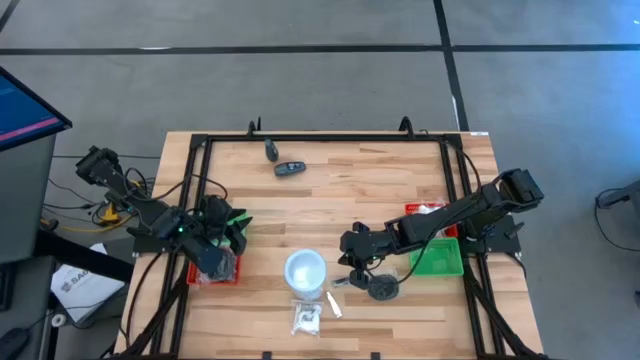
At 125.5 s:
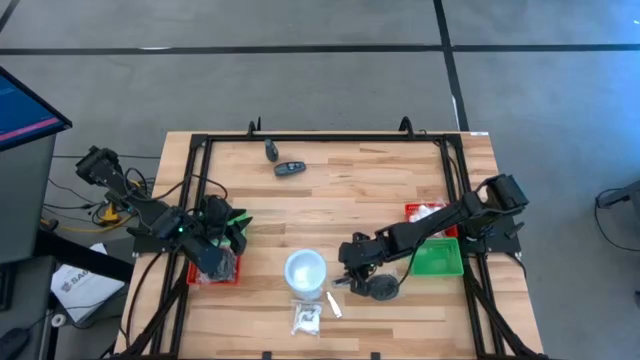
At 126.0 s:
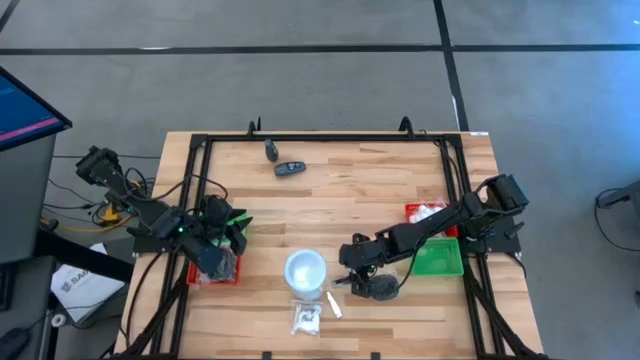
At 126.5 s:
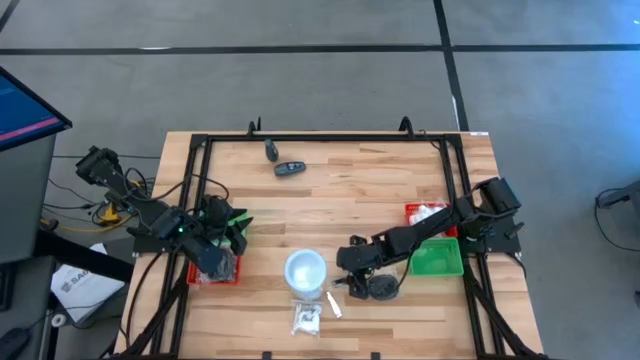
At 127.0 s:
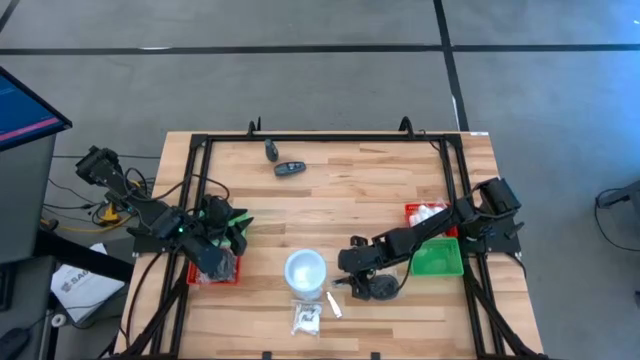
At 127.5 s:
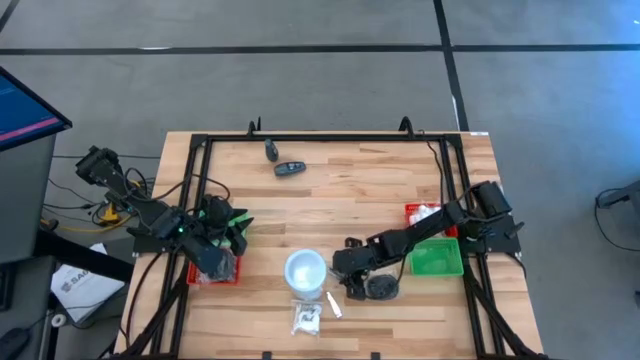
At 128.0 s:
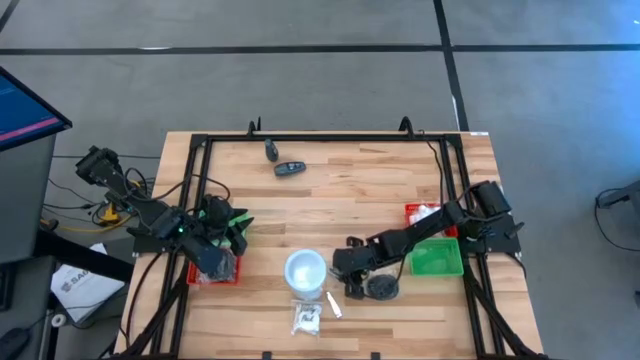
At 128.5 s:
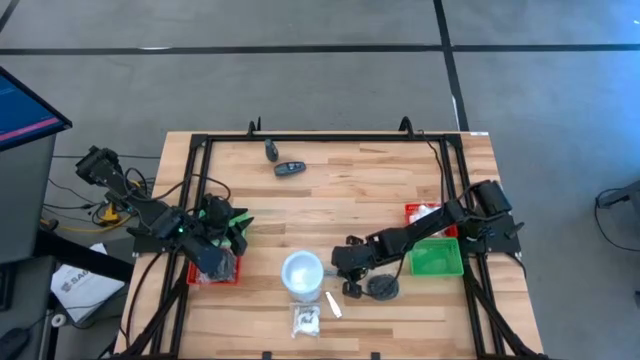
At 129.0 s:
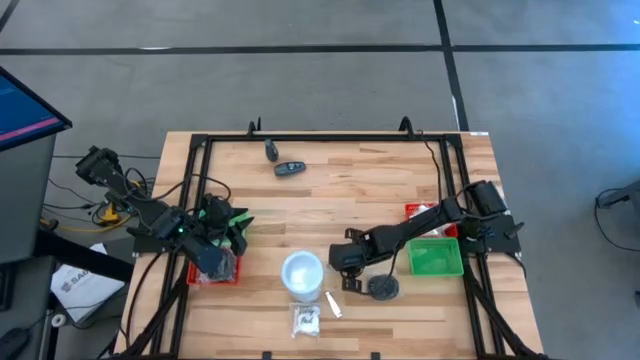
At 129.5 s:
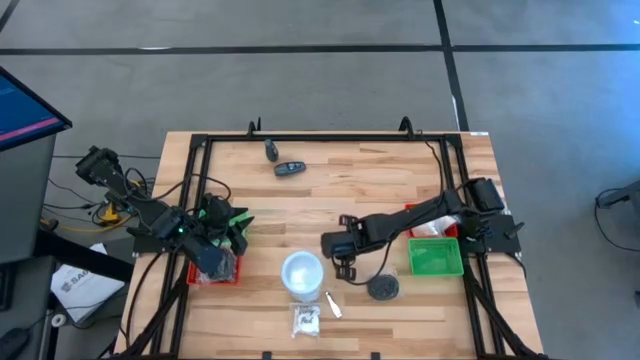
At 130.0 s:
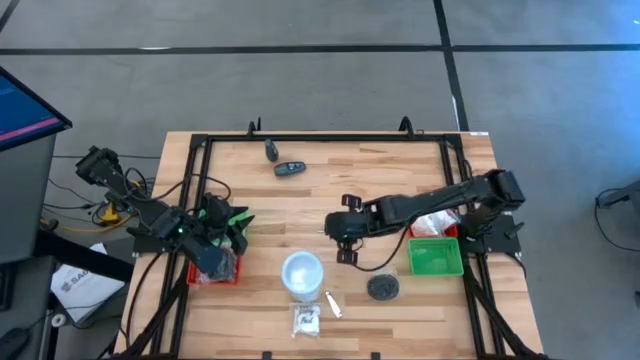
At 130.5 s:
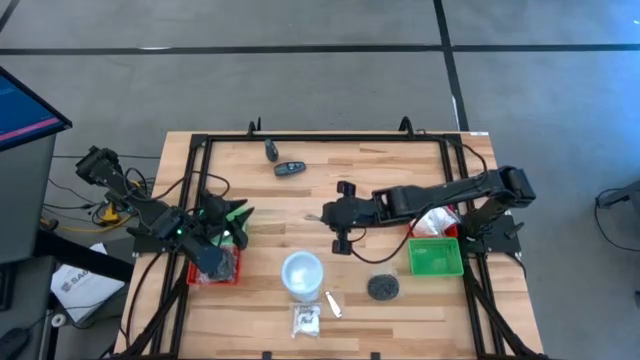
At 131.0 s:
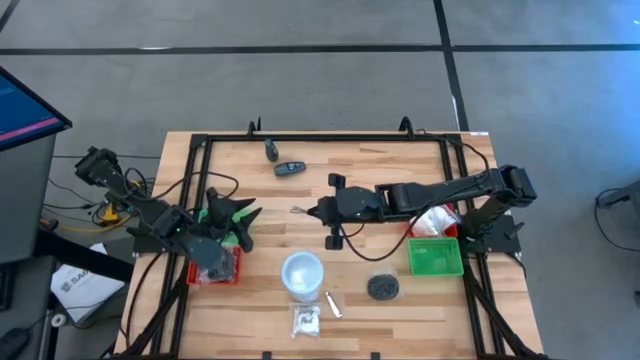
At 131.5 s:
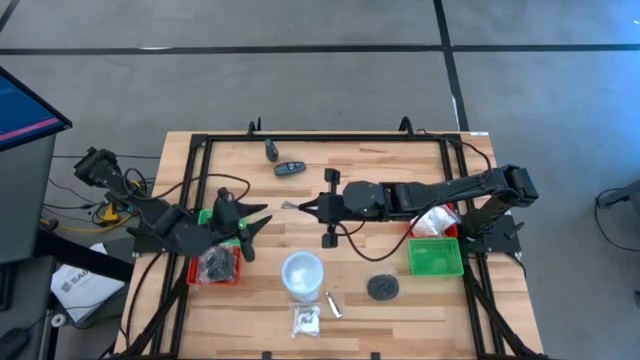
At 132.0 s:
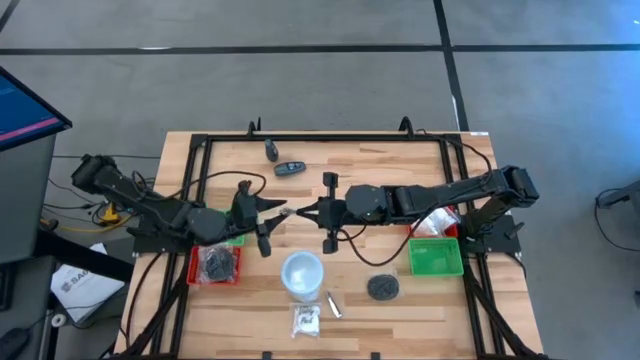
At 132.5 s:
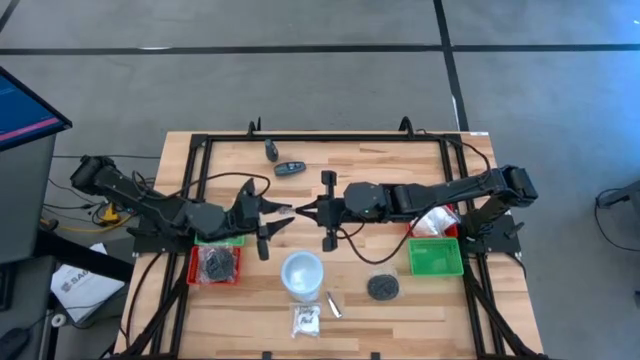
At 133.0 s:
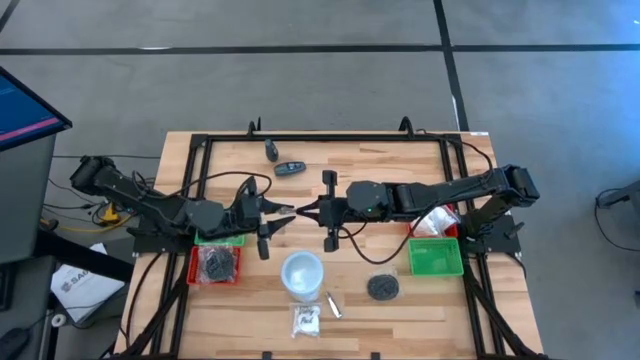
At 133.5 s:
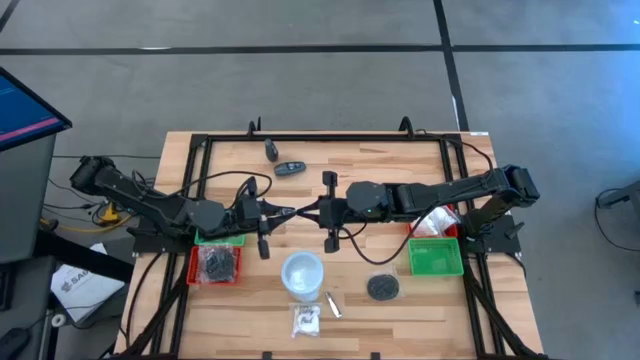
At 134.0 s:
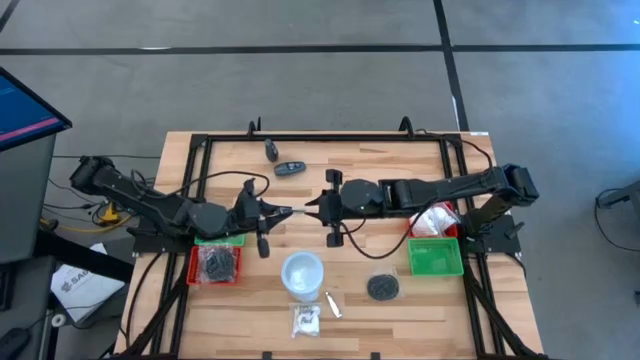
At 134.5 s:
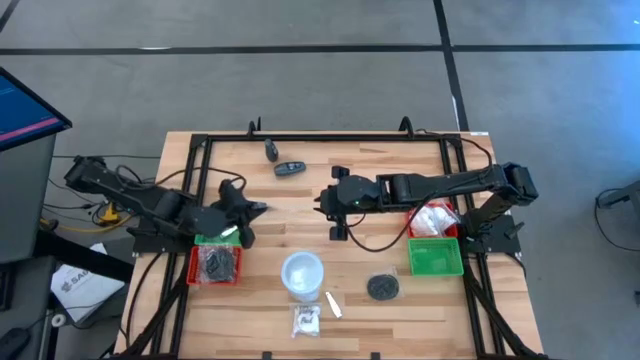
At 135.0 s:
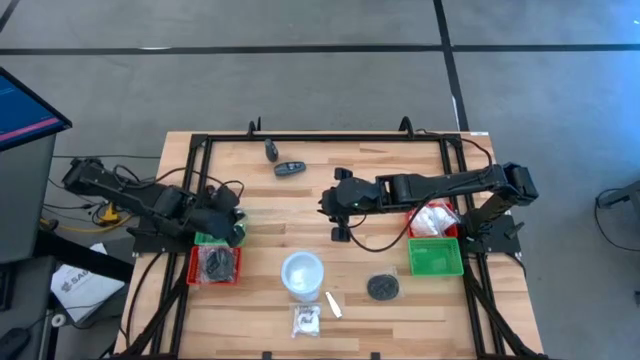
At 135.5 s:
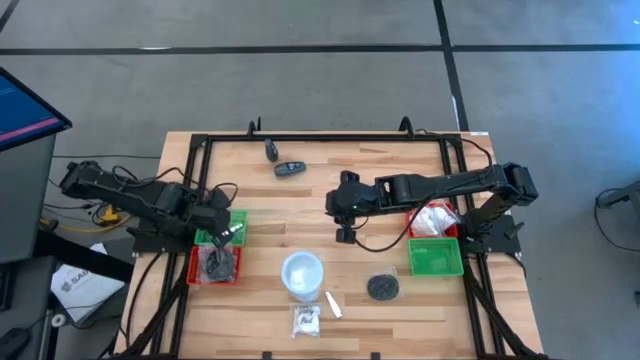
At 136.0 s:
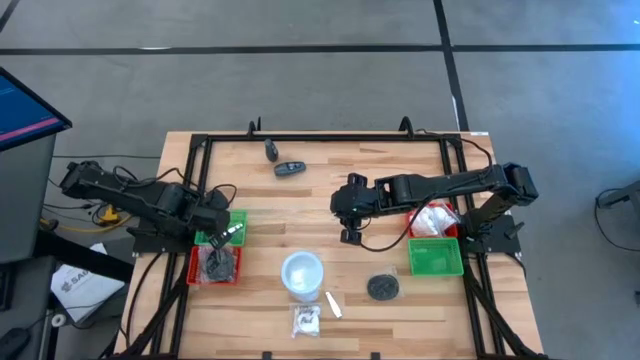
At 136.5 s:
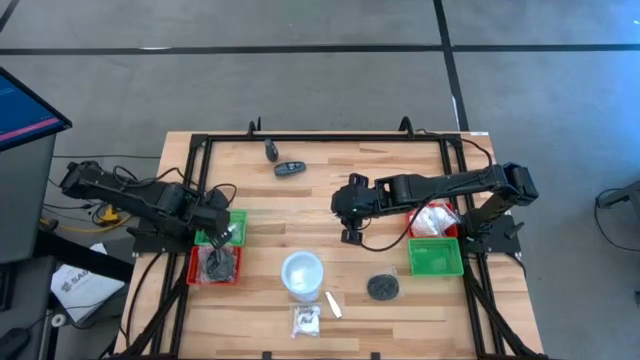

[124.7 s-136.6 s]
Task: Pick & Place Travel size toiletries
Put the silver nail cutter into the left green bin

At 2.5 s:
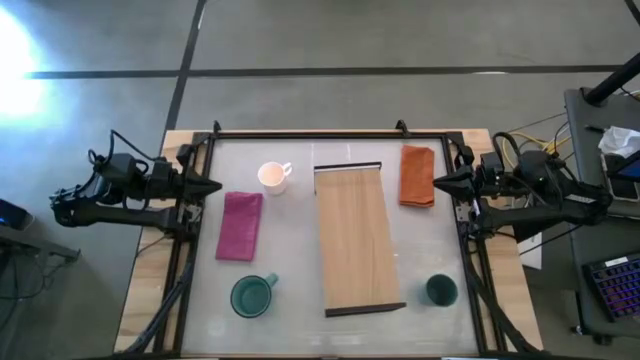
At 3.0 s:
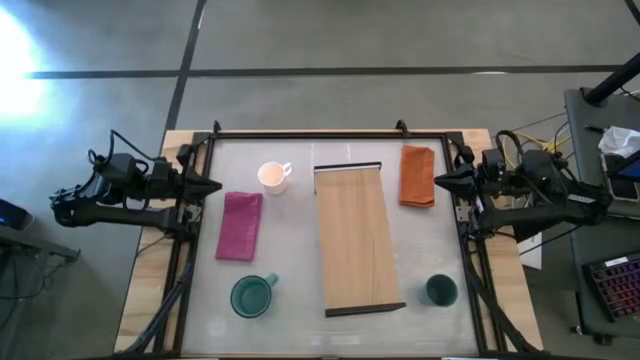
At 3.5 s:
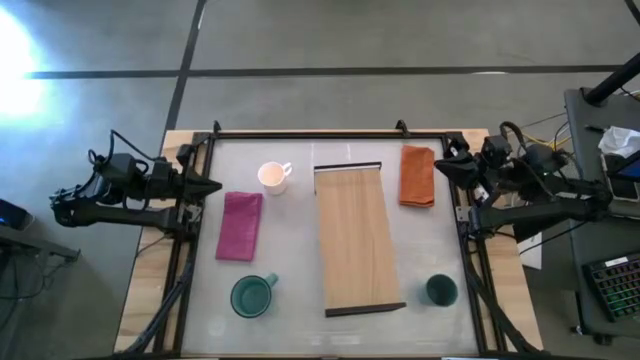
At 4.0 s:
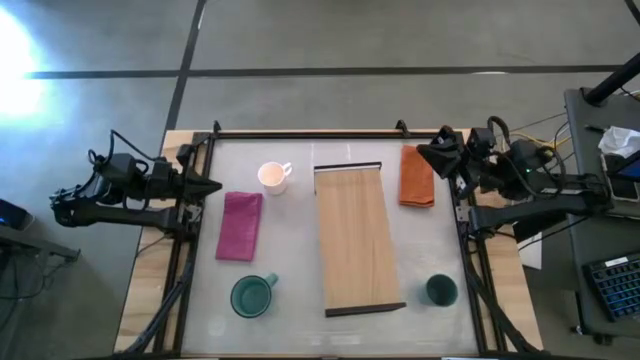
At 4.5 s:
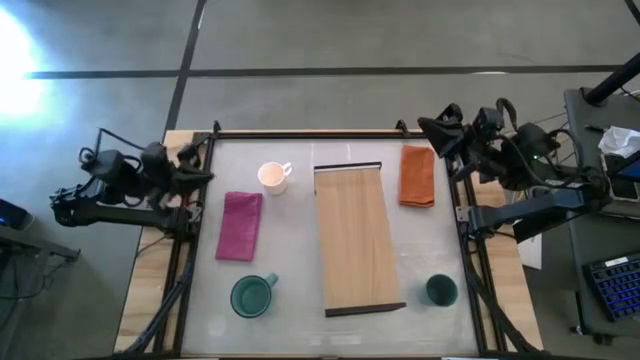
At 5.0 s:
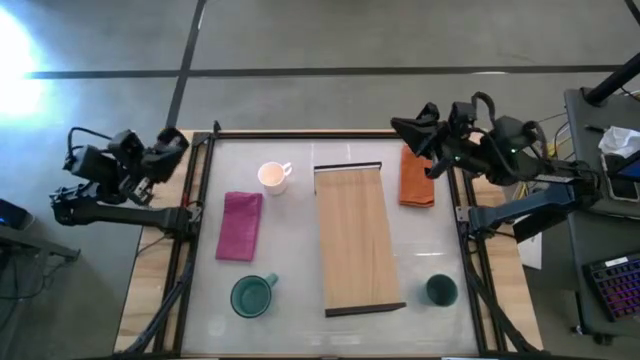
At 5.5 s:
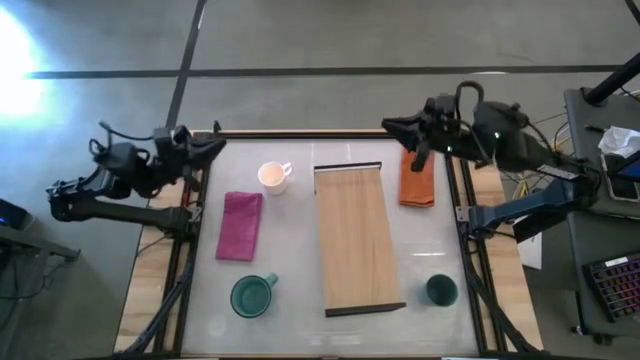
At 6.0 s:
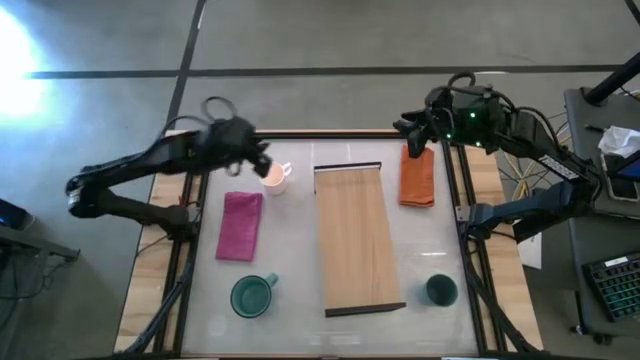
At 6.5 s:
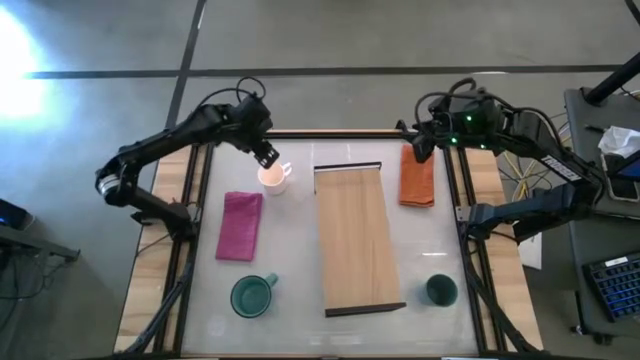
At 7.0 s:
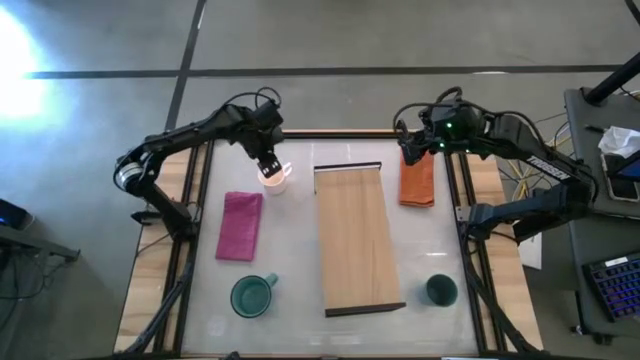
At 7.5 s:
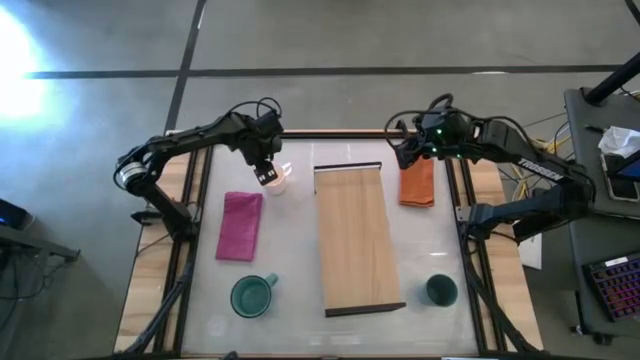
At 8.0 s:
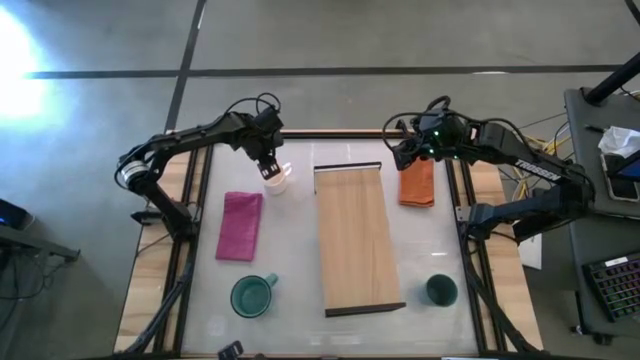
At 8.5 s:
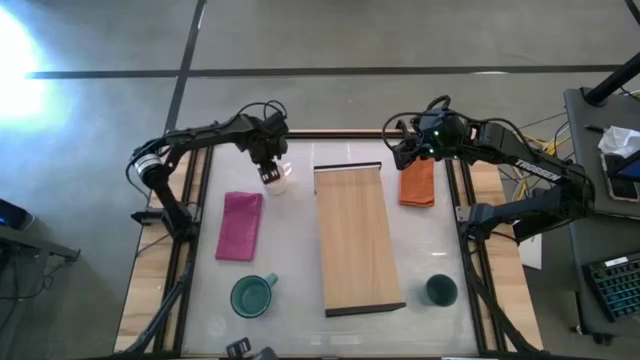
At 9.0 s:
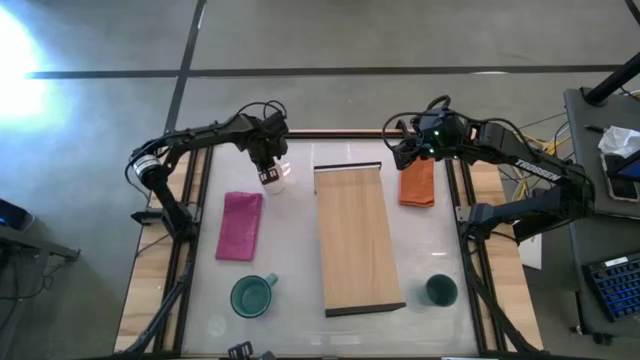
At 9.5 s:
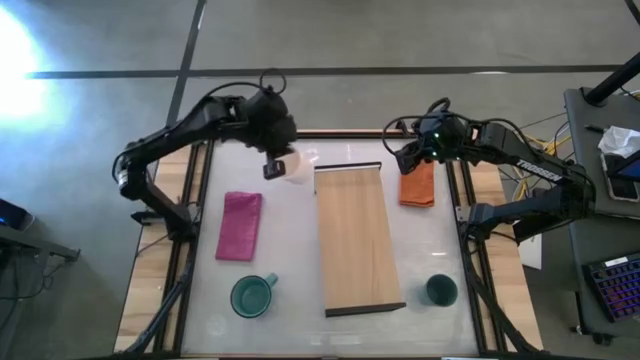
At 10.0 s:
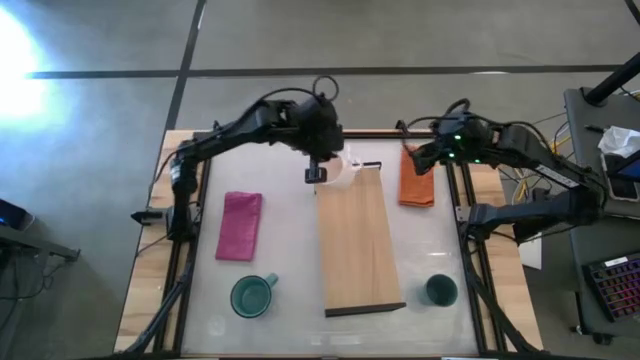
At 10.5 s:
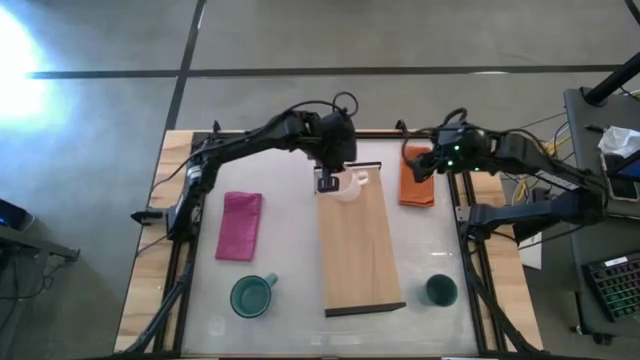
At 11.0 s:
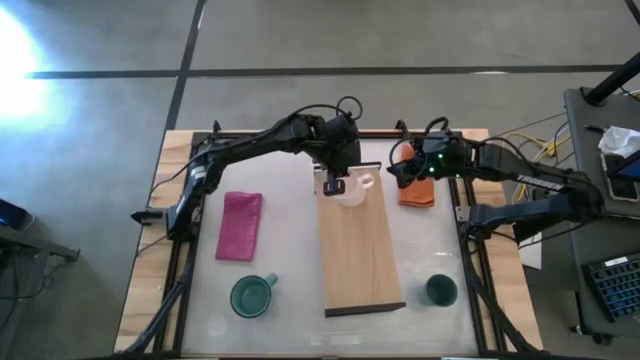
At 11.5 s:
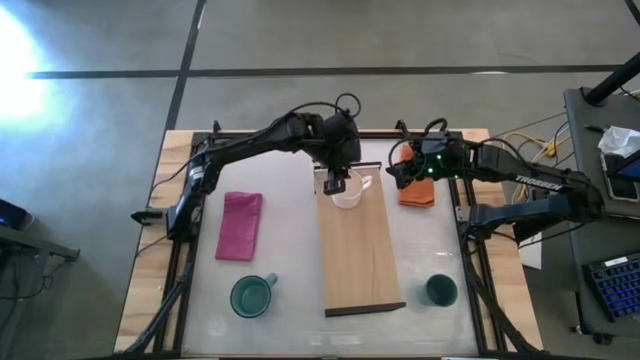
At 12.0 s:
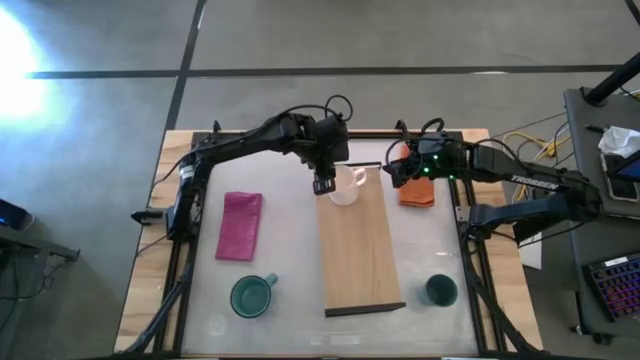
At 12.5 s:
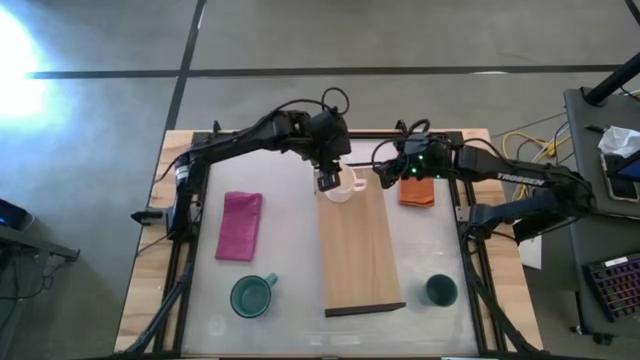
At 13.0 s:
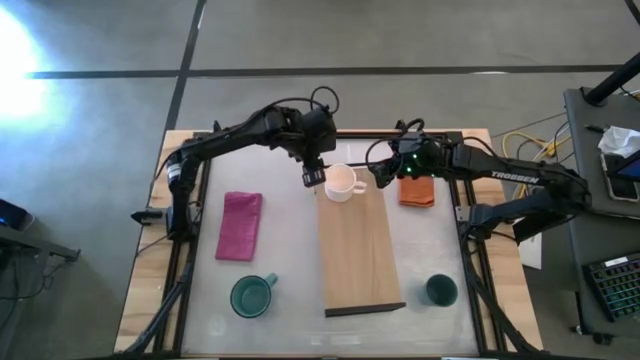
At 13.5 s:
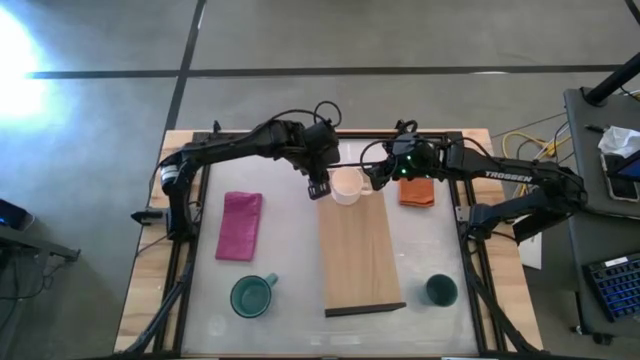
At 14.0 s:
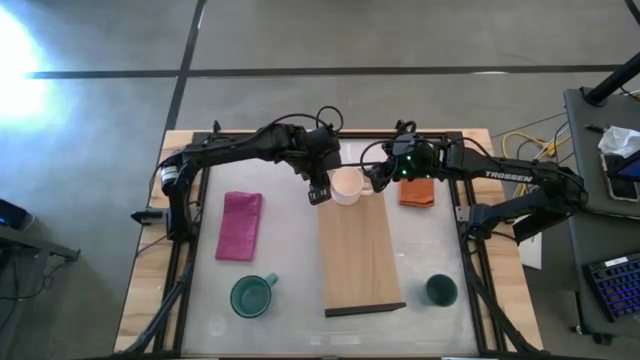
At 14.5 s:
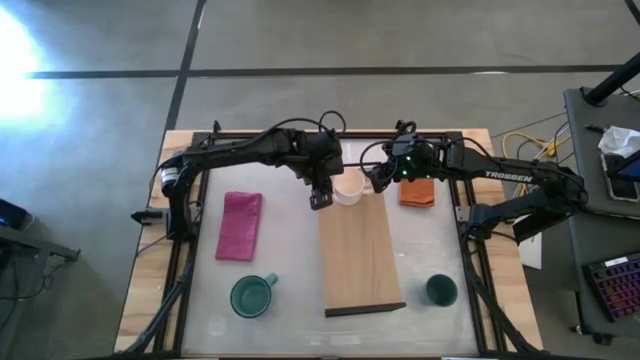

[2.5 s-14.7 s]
Task: Stack small to large cups/mugs on shelf
Put the white mug on the shelf
